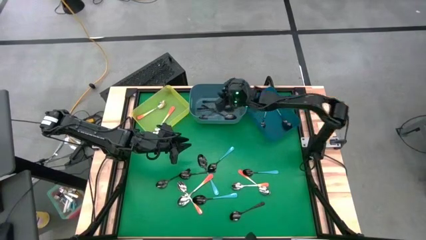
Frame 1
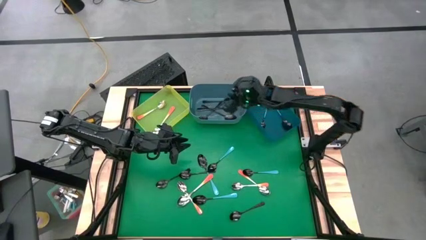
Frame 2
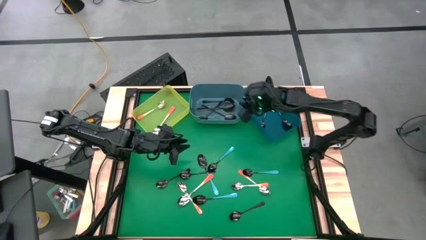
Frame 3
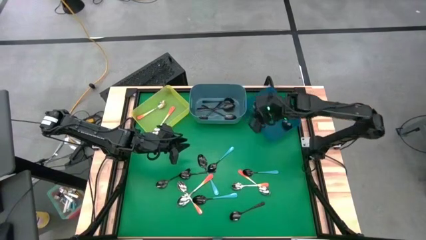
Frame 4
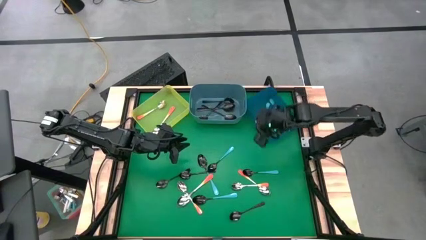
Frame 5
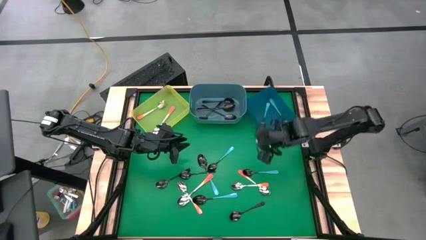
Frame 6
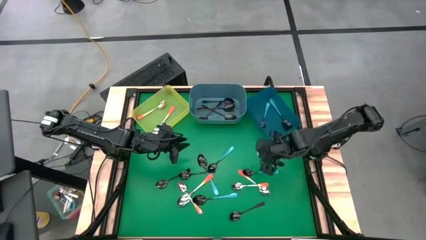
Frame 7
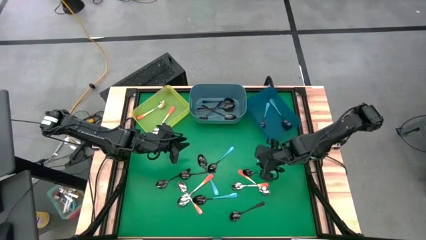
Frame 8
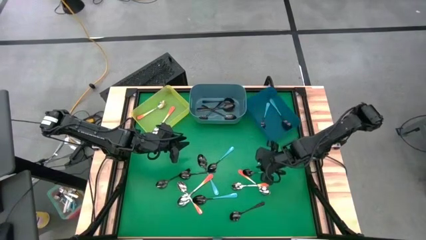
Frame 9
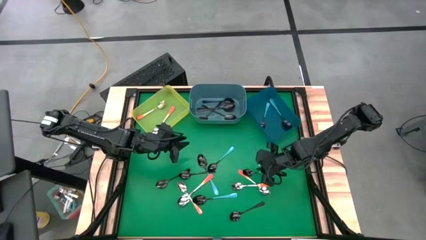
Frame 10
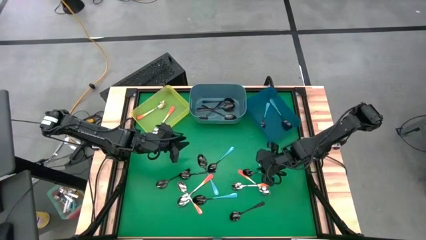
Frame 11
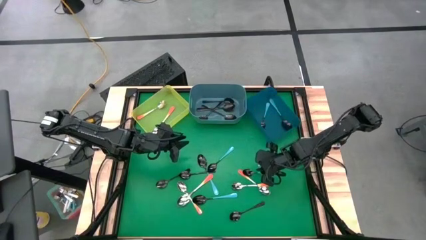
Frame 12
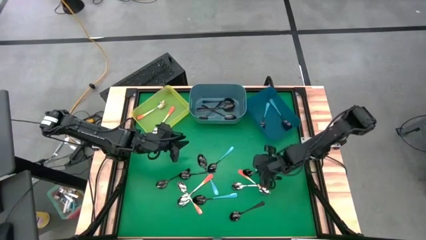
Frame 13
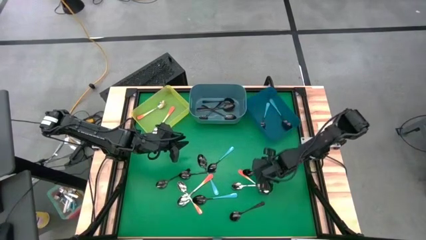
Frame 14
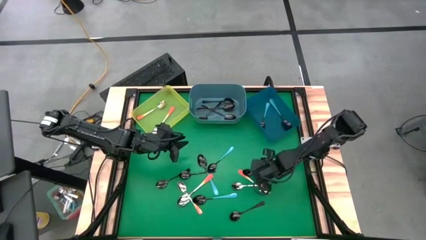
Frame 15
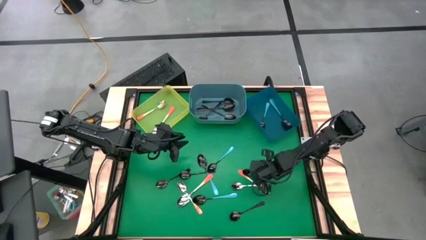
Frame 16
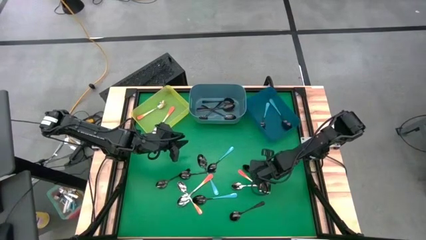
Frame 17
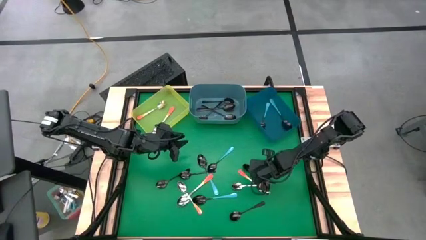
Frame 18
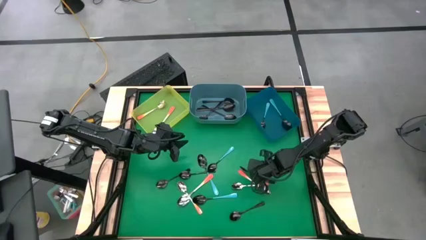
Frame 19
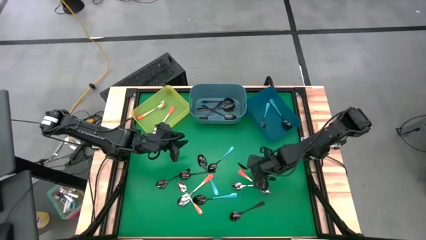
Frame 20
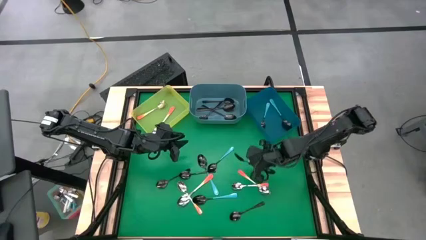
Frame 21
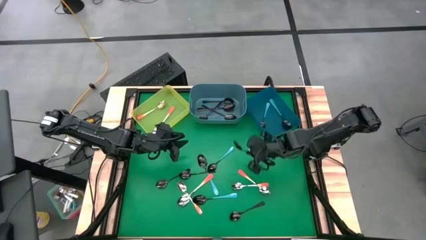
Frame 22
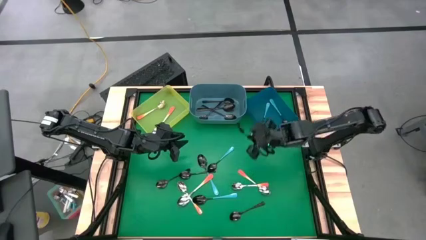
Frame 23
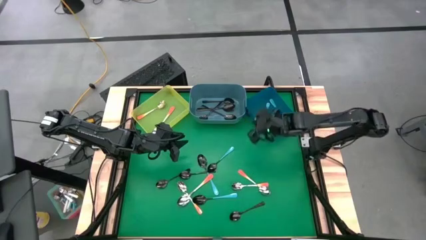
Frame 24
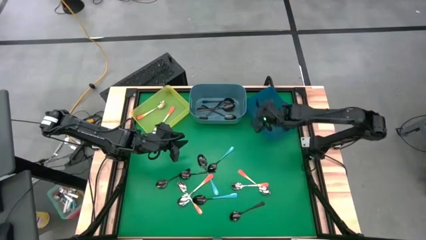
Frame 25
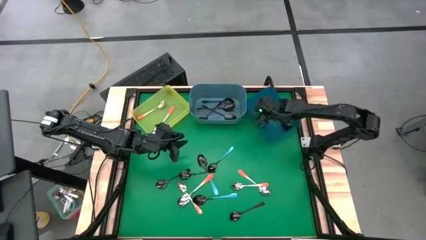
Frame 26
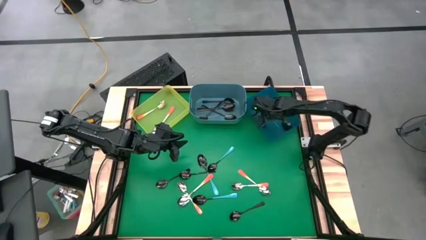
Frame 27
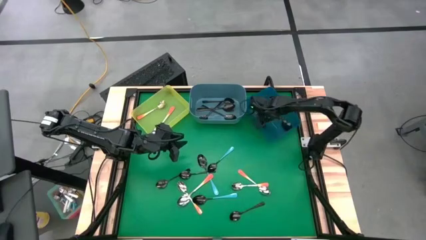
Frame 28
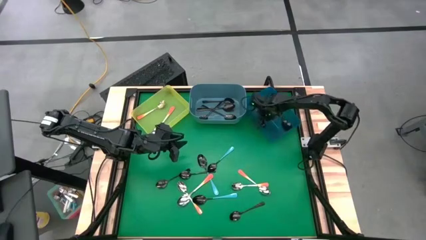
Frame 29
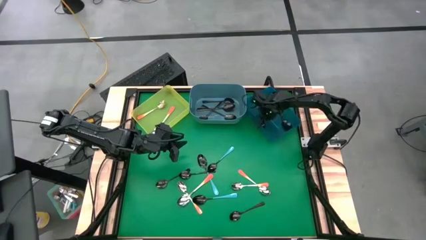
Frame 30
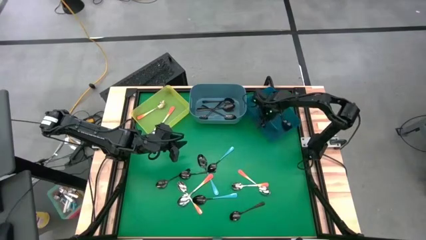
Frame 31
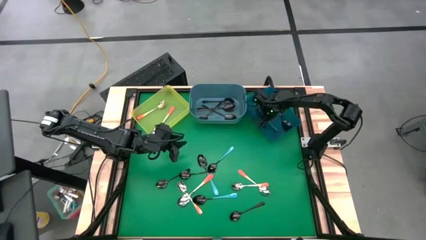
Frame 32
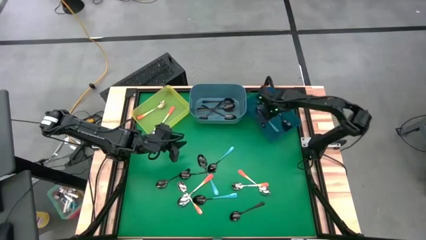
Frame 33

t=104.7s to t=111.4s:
Task: Sort silverware by color (type)
Put the blue spoon into the blue bin

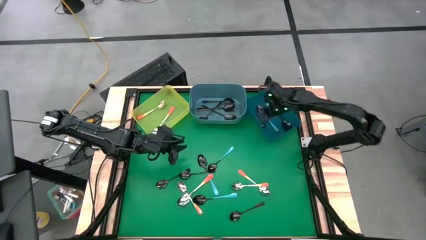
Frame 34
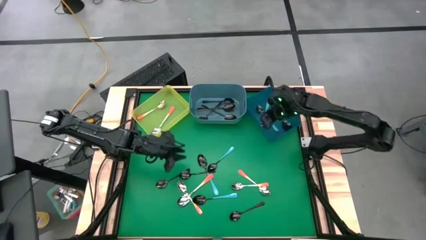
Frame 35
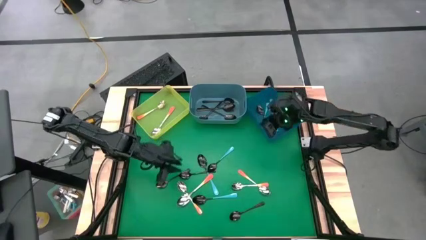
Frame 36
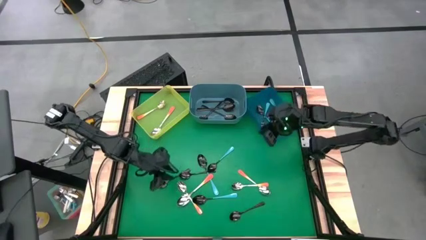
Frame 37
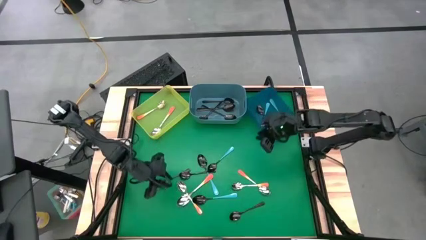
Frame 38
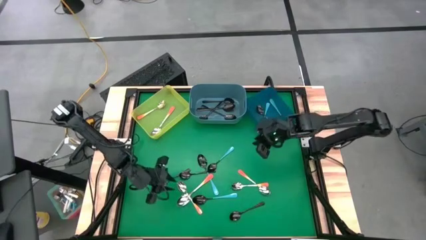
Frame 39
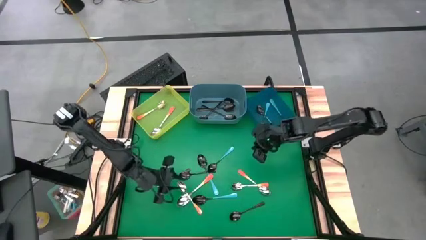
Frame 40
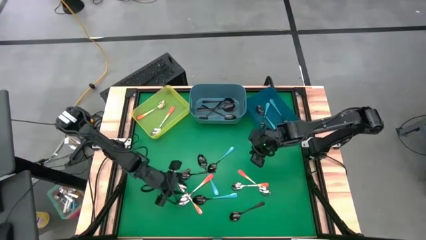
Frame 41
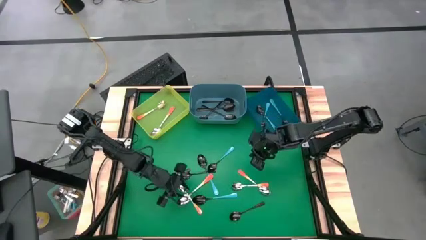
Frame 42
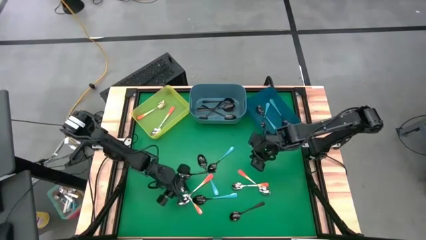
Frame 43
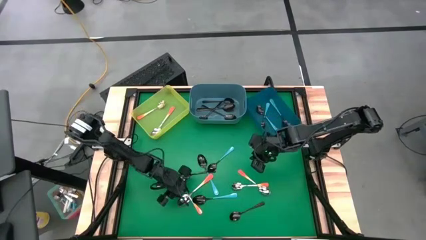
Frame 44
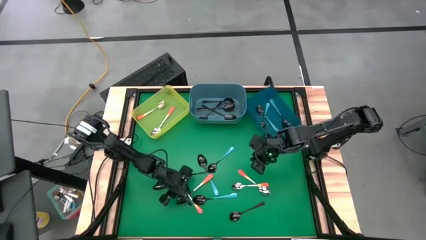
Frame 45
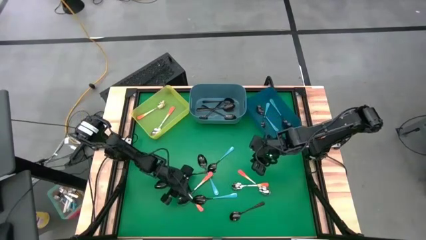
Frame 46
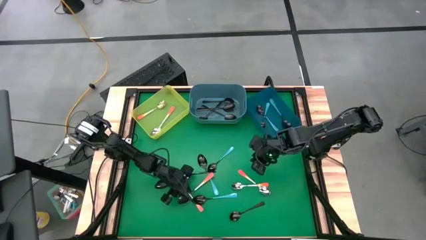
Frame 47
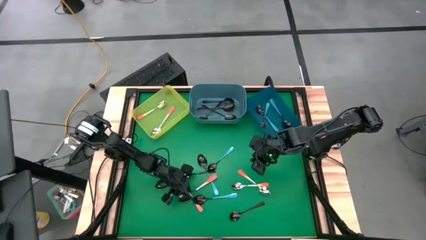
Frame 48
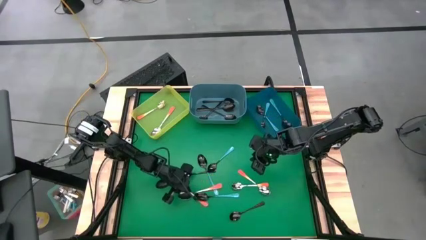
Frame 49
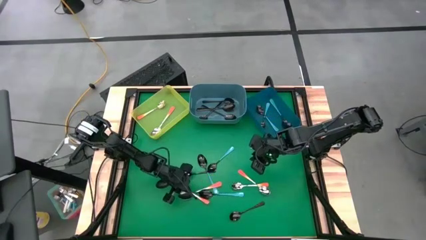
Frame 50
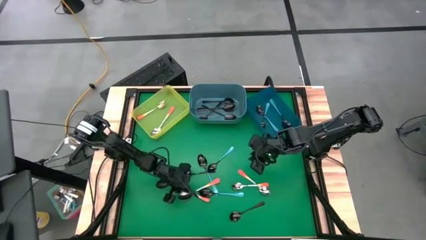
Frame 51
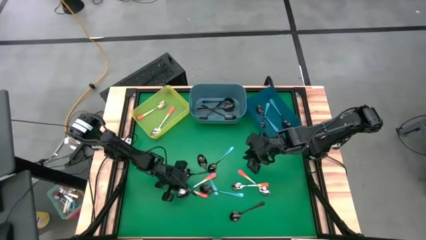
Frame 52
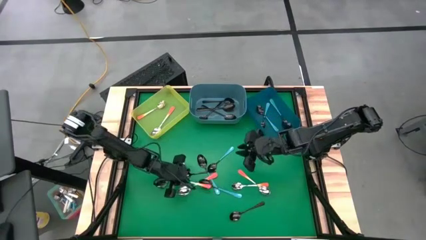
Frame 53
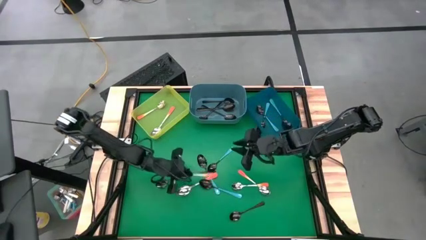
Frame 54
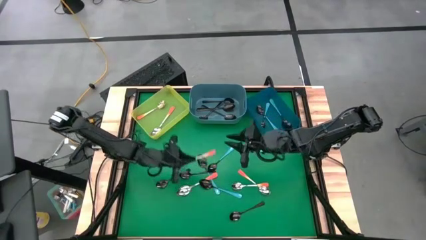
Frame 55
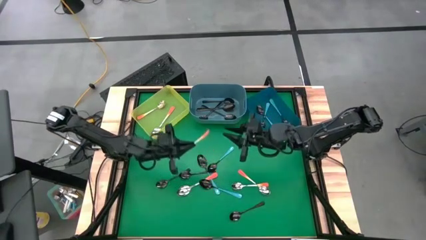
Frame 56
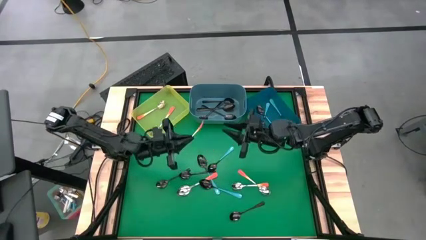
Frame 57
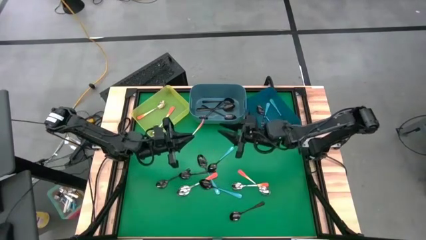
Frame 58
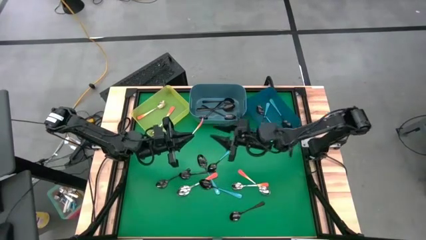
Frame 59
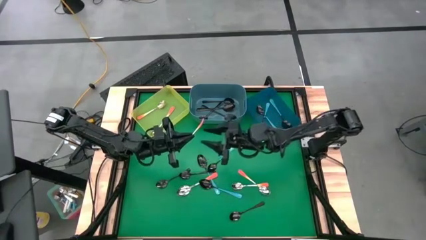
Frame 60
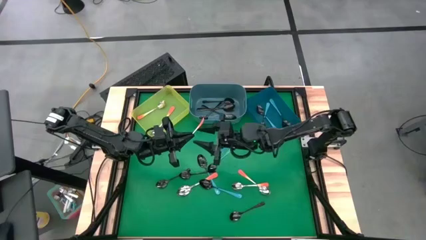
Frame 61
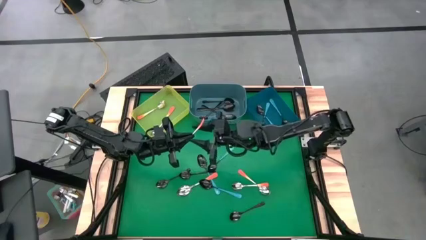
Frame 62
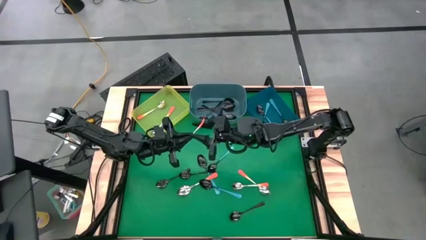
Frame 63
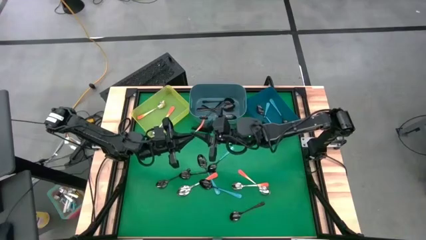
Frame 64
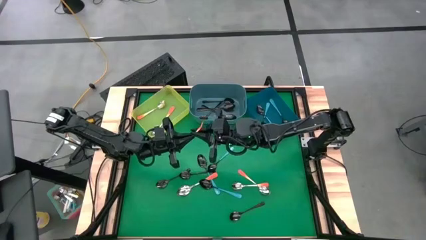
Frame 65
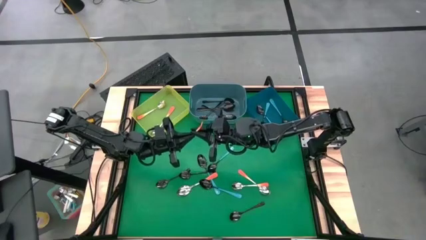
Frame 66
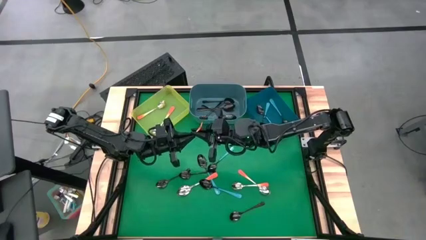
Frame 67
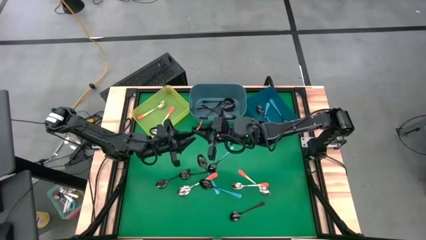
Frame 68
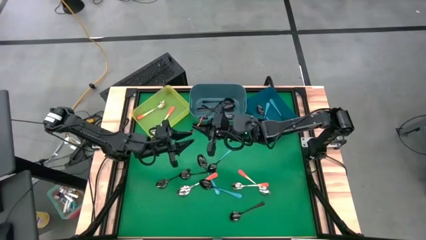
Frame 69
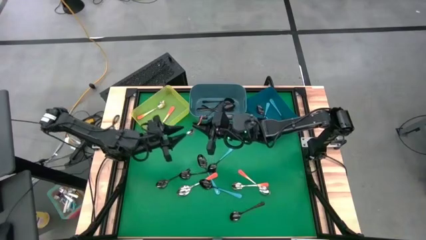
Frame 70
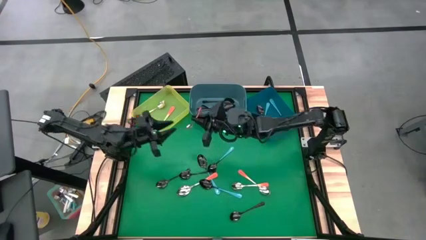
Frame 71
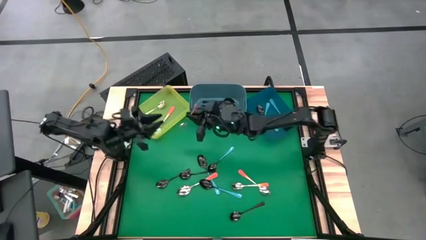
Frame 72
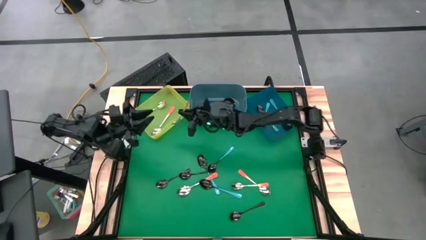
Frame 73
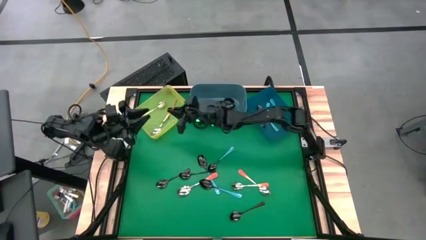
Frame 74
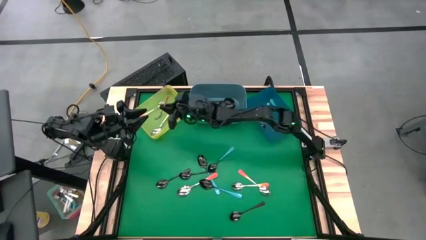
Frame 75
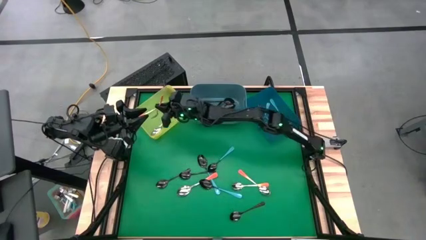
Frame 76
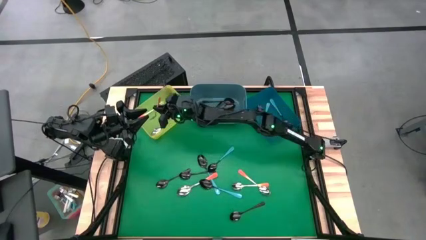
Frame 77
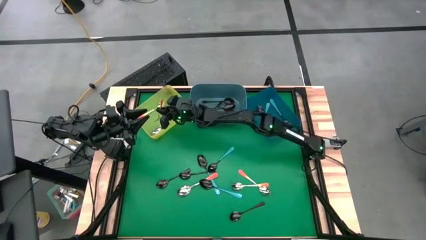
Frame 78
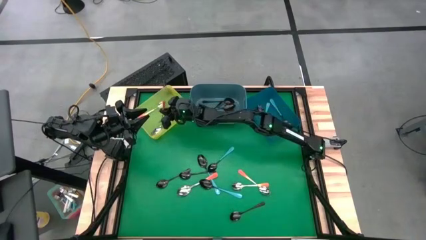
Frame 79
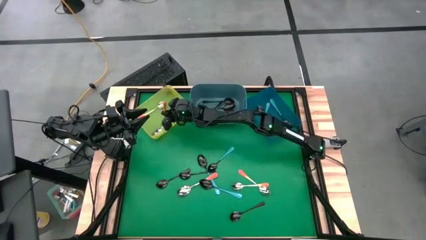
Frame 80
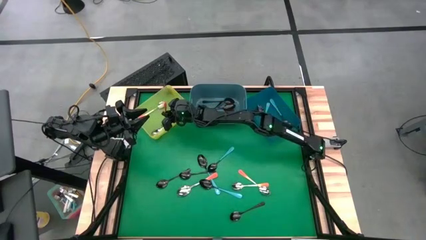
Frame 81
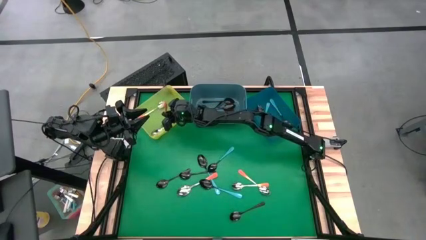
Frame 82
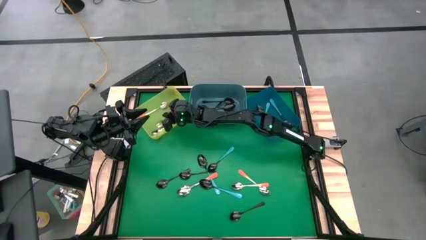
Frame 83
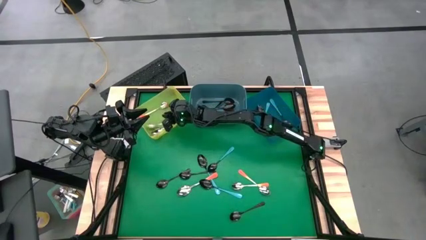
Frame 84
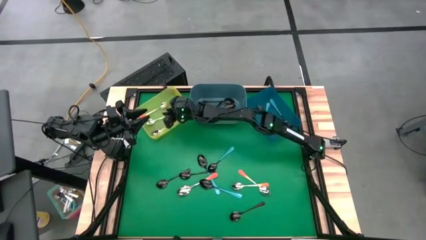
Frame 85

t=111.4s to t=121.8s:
Put the orange spoon into the yellow bin
